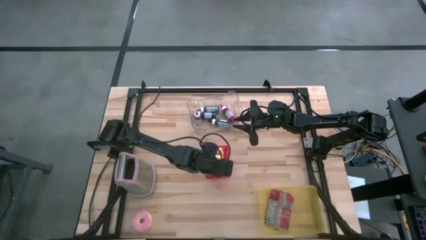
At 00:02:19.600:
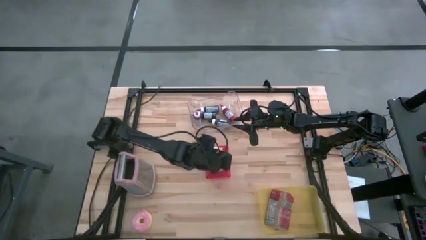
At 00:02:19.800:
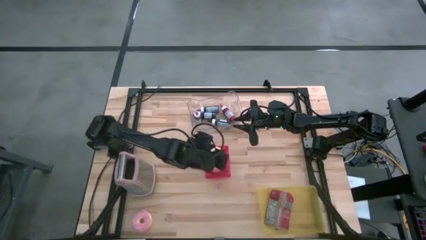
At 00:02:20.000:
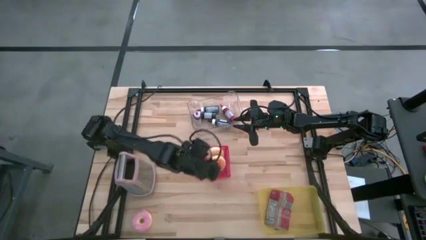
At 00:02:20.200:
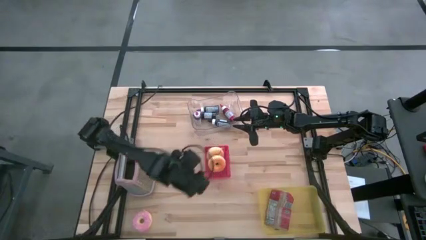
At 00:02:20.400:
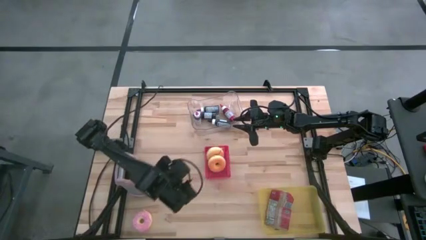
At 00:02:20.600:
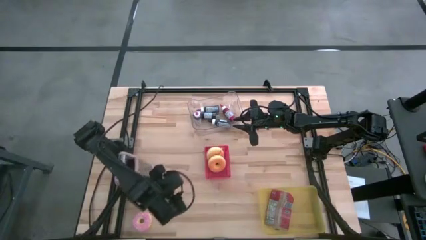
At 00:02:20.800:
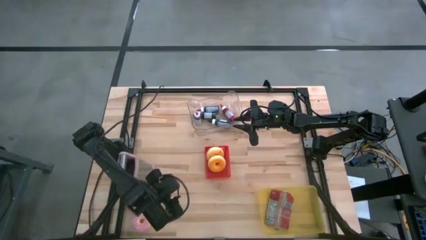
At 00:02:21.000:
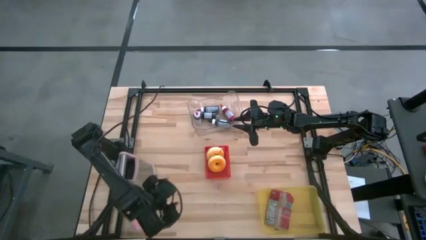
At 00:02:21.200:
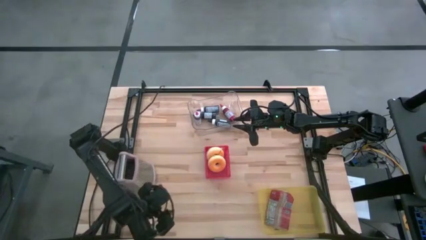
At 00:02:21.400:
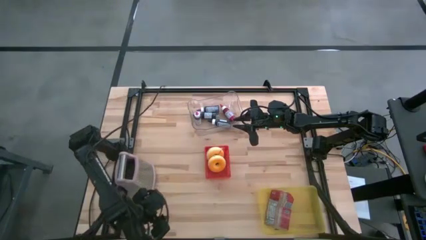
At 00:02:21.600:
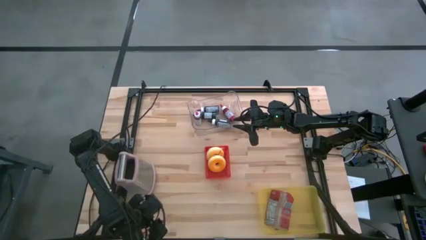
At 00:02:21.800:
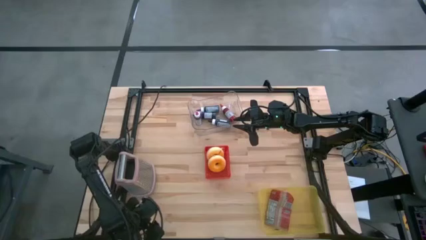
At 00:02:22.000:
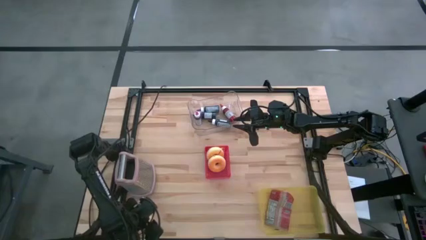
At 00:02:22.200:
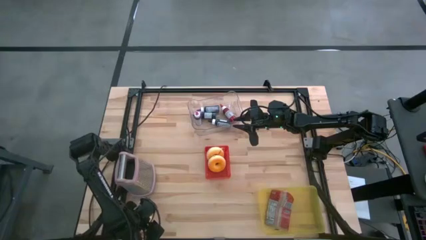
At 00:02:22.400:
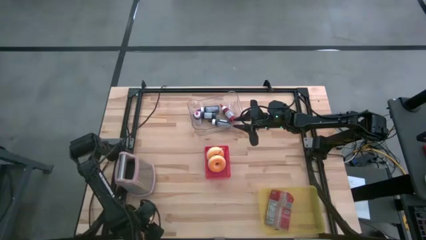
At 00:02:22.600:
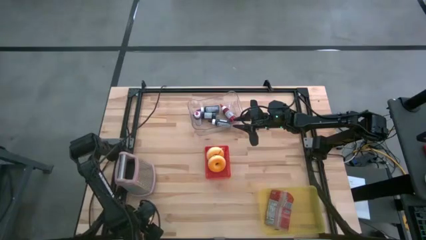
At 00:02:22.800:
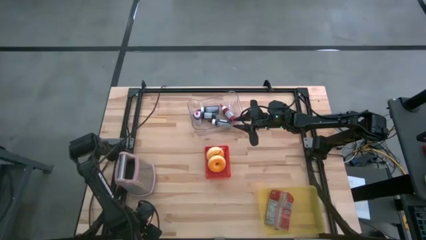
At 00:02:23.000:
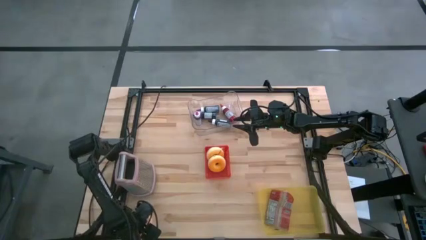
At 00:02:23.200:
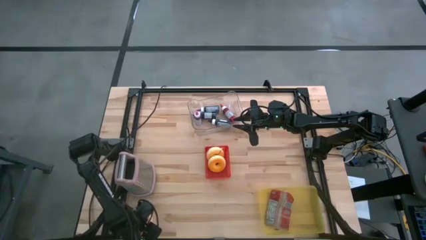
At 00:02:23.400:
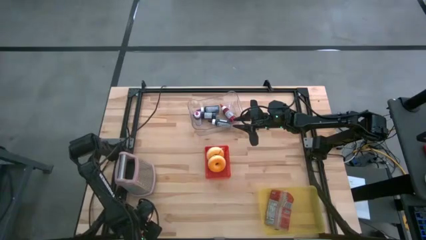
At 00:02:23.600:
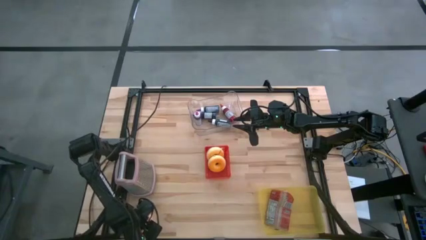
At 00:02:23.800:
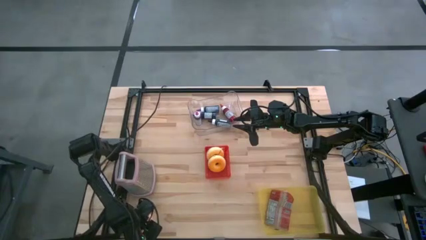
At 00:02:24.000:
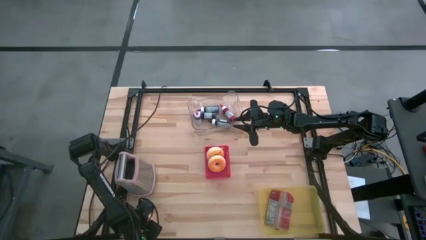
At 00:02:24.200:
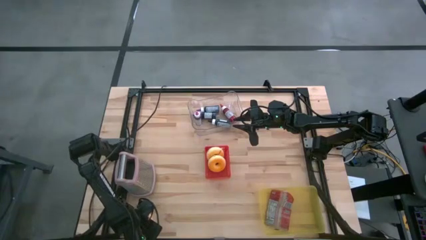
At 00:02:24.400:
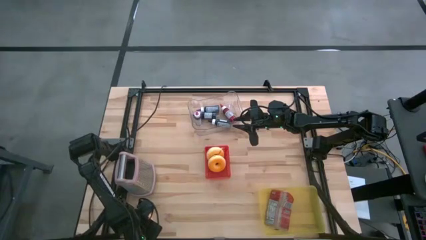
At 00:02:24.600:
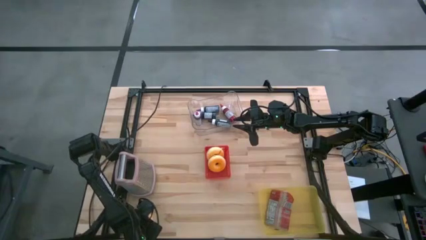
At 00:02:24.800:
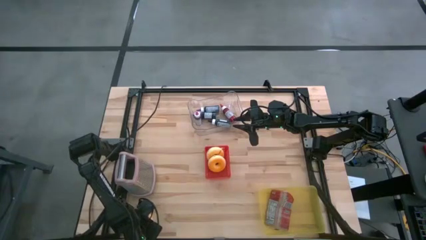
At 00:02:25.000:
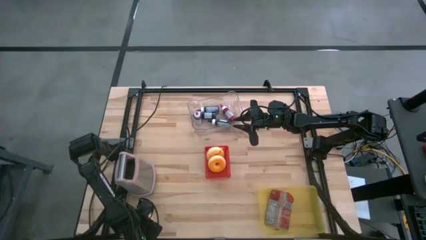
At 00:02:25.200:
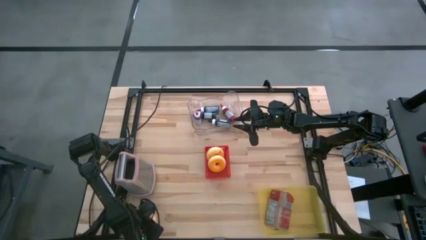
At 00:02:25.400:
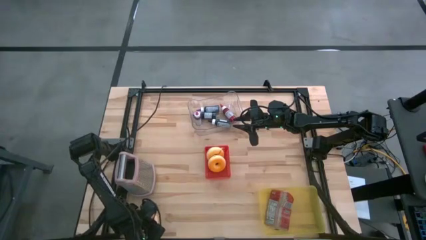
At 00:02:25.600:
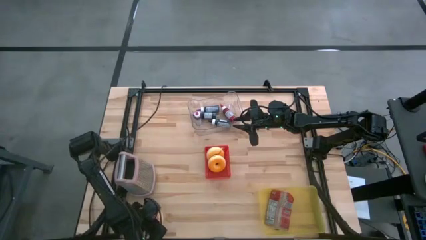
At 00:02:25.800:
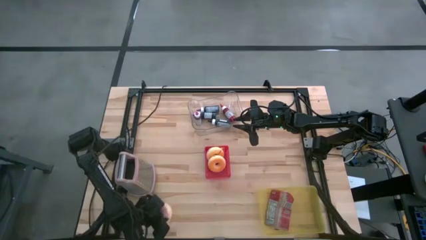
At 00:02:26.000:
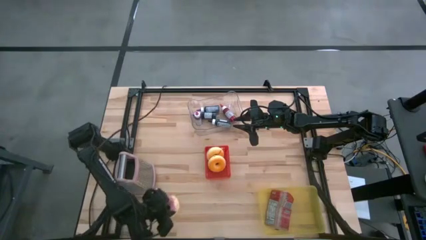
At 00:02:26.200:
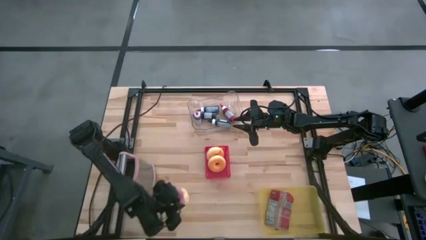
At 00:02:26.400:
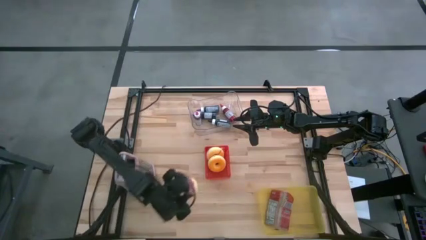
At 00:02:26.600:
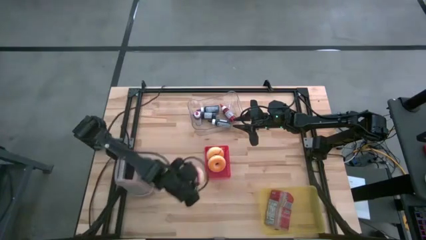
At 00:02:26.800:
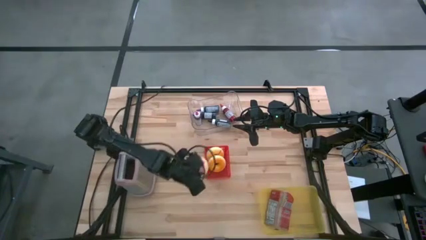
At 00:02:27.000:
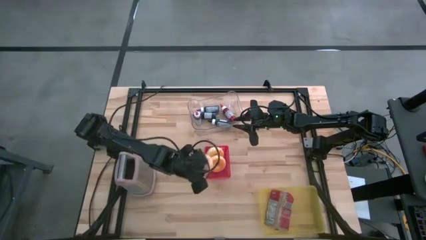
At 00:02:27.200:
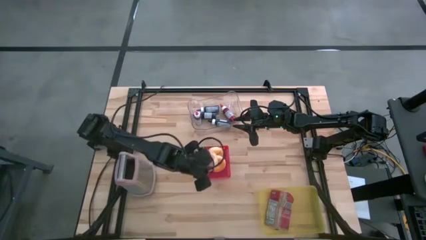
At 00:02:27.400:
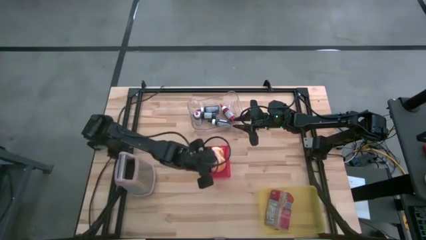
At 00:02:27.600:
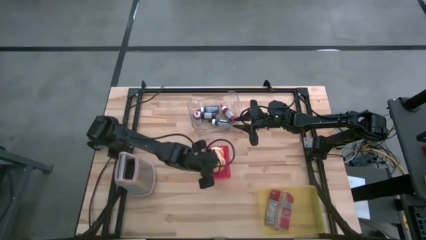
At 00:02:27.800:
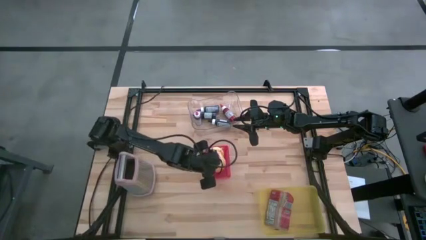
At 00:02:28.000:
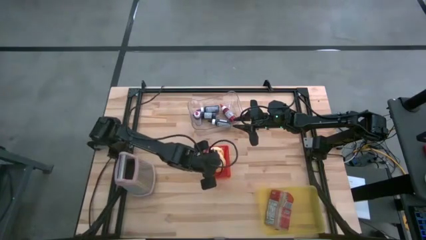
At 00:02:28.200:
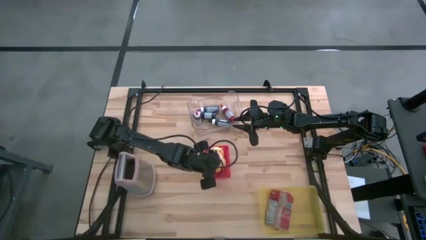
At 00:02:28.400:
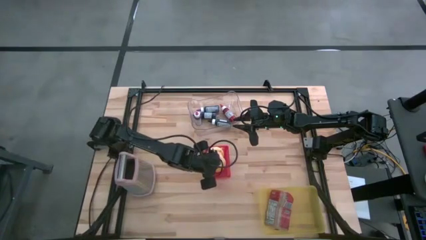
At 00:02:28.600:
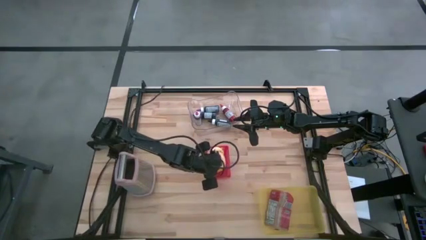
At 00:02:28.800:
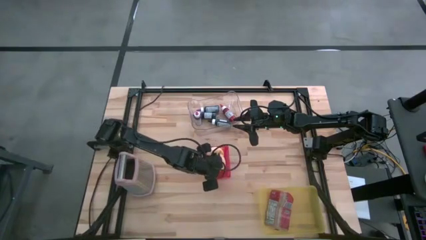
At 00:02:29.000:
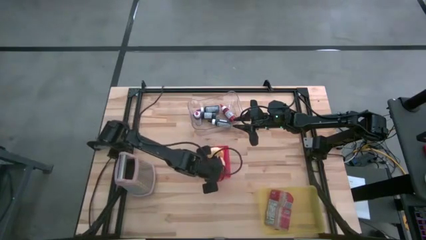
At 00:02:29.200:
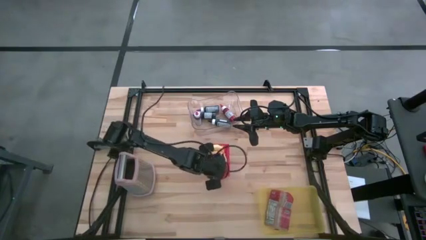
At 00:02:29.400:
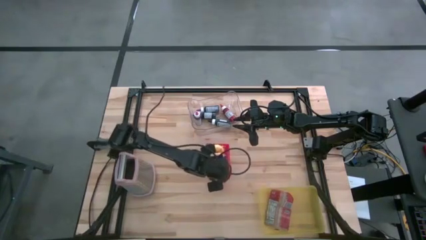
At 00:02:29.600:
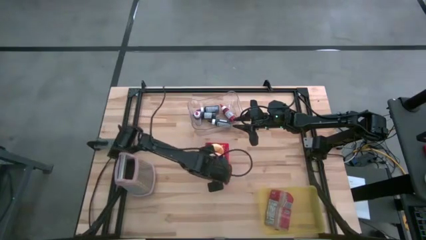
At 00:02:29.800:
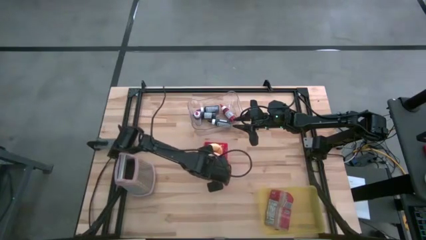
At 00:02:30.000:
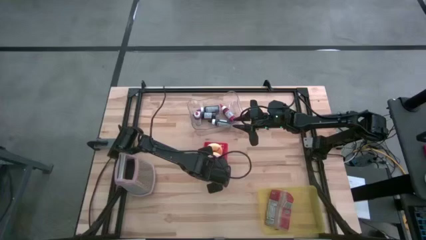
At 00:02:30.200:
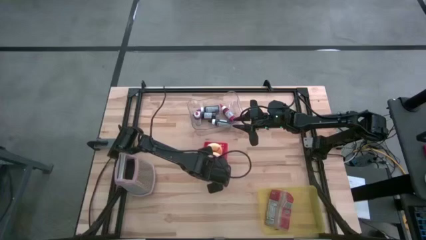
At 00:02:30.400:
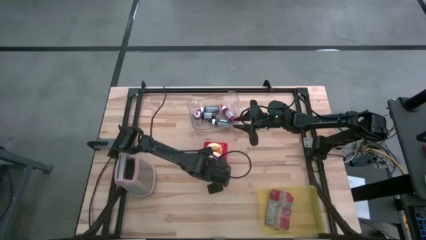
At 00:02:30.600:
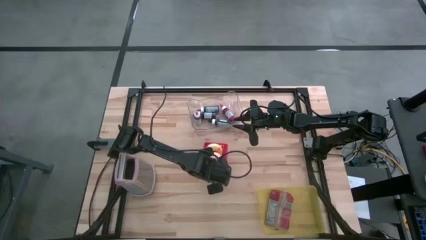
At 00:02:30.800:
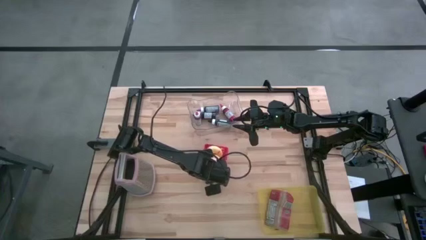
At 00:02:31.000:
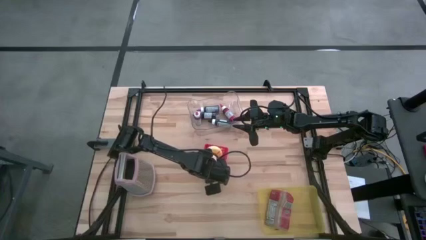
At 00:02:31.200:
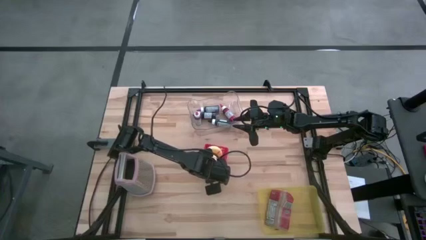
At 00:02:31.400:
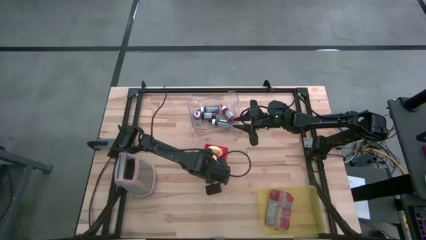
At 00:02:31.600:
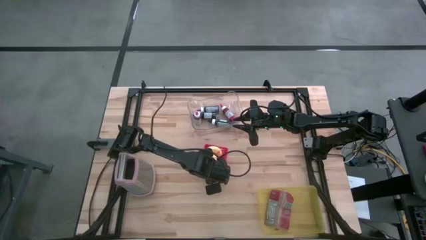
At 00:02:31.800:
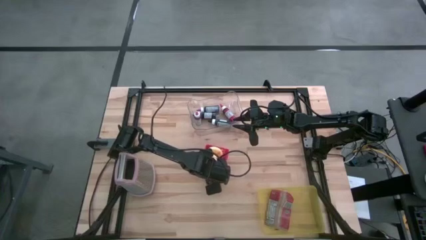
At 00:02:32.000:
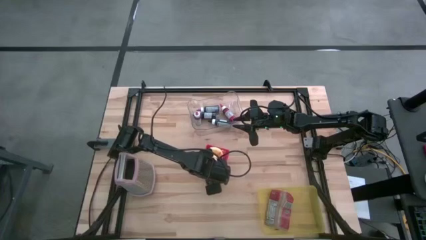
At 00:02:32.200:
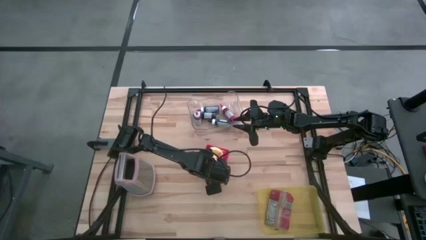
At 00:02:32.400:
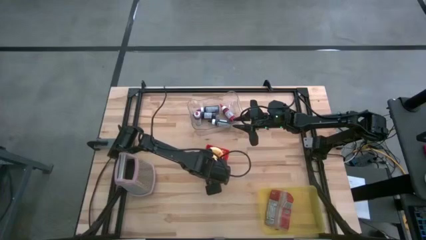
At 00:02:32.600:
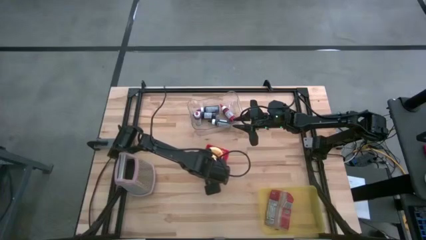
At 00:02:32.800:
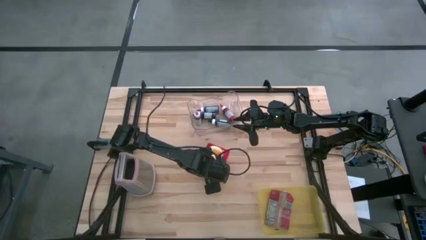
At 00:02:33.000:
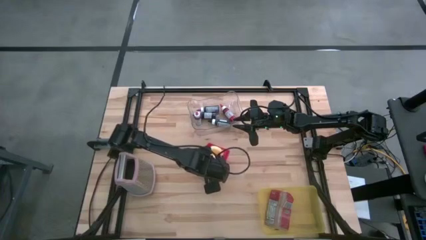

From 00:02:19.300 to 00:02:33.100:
Task: Pick & Place Food Item
Put the pink donut into the red bin

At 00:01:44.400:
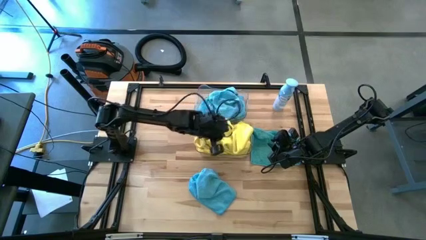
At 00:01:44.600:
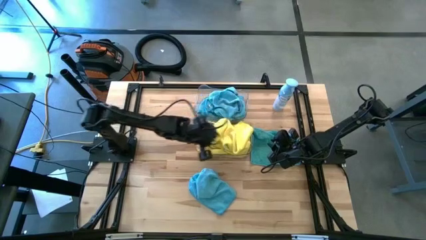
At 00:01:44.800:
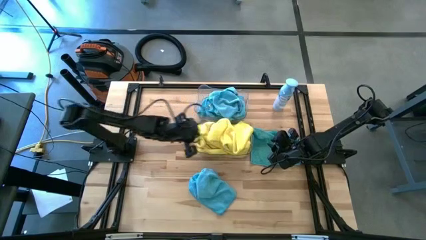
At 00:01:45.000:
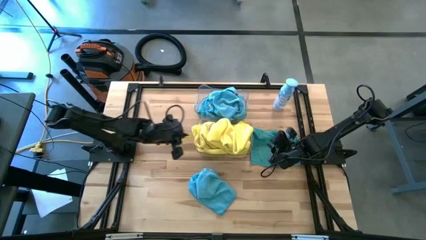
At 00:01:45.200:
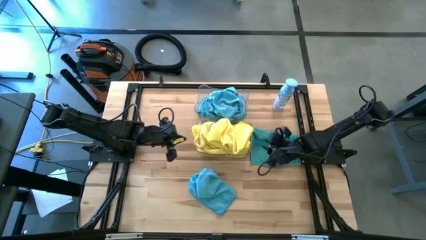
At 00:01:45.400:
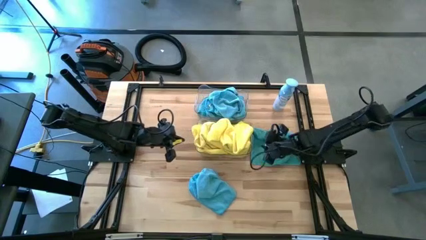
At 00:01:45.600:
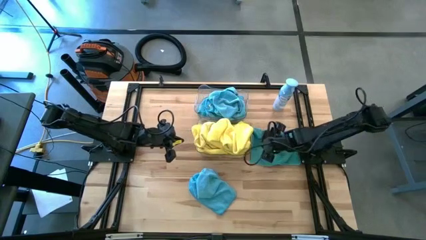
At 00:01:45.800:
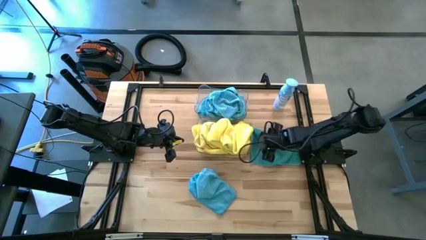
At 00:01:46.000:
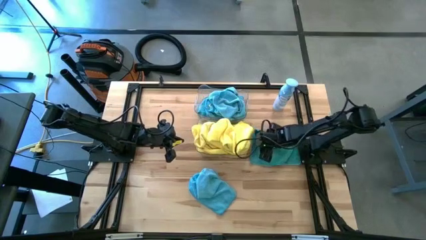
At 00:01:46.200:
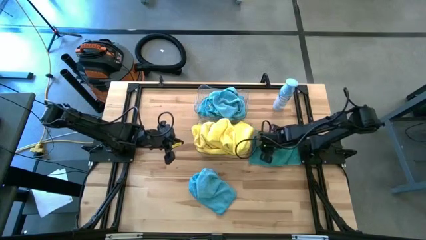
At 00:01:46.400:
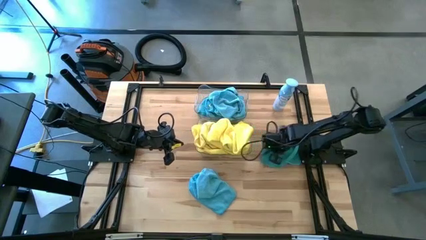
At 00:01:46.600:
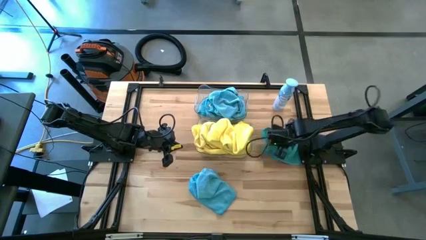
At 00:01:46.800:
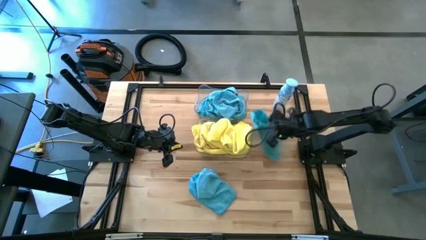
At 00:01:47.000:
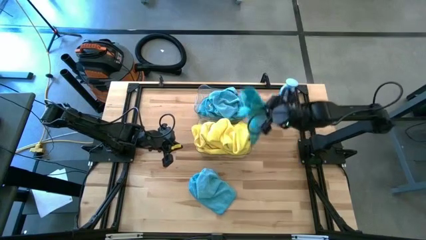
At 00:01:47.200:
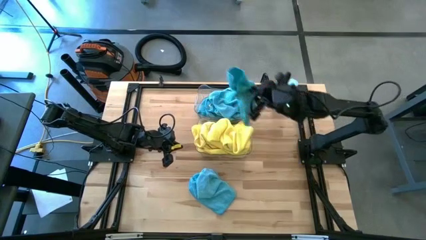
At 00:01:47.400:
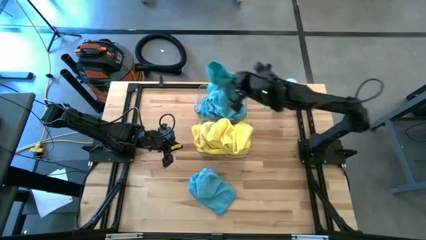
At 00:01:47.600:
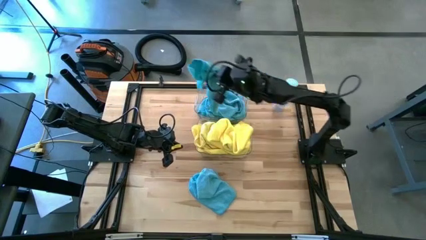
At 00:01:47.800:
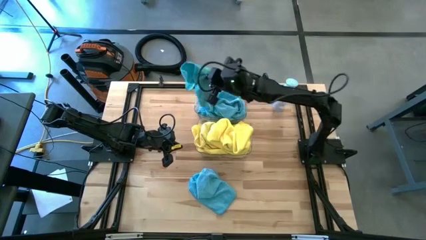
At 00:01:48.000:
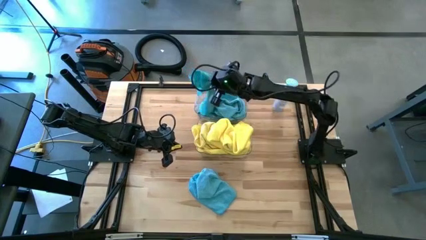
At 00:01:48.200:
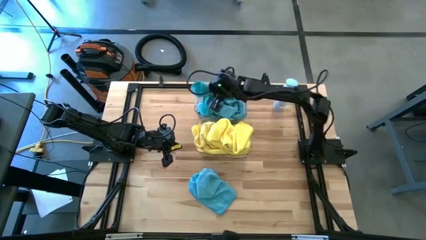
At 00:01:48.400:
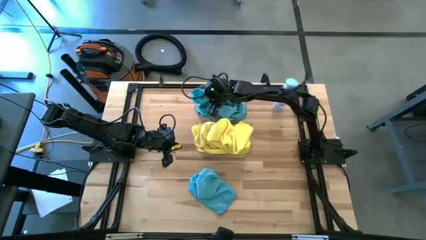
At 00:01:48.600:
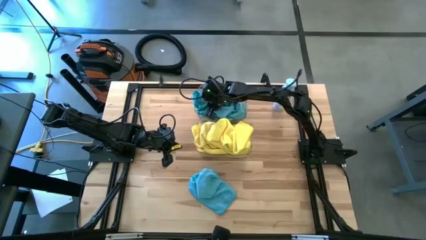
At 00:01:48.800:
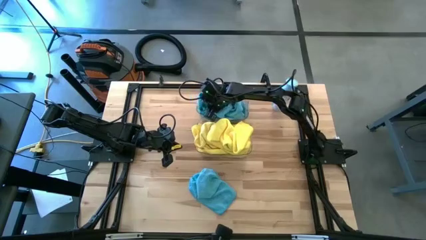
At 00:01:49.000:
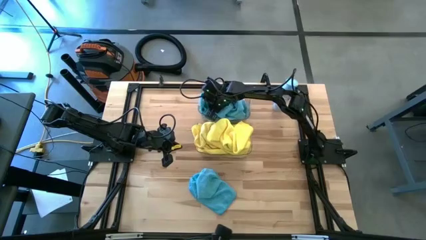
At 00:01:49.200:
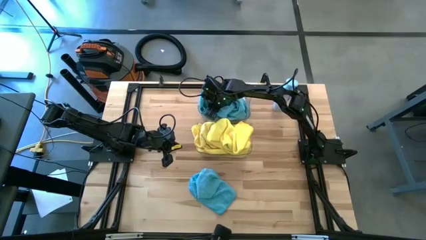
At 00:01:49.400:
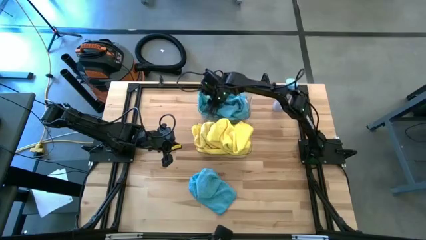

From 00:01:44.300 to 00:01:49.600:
Task: Sort microfiber towel by color & place in baskets
Put the blue towel into the top transparent bin
